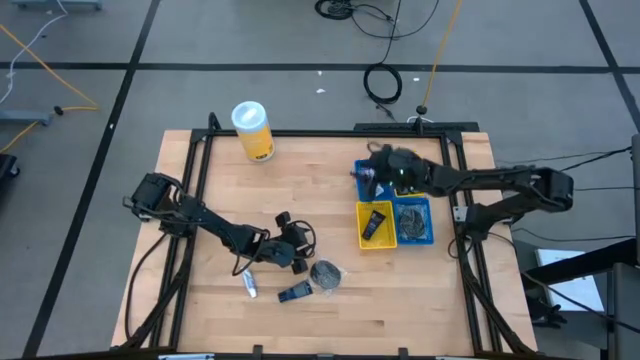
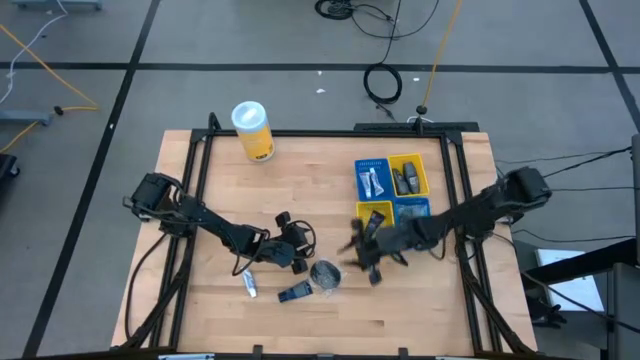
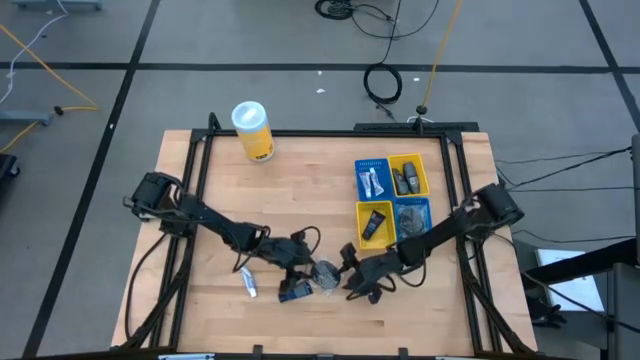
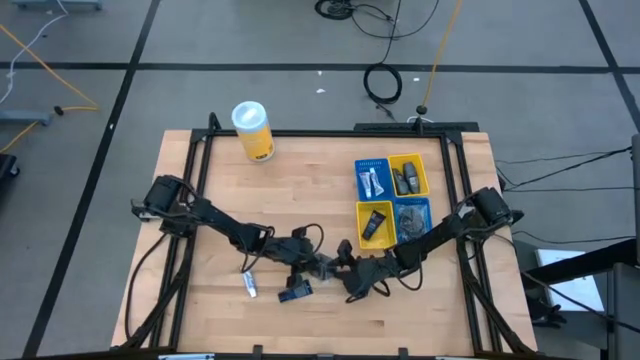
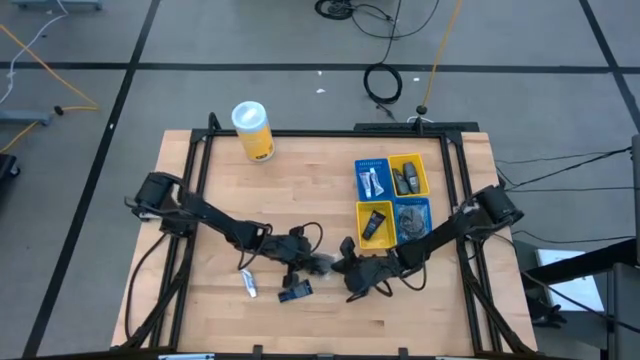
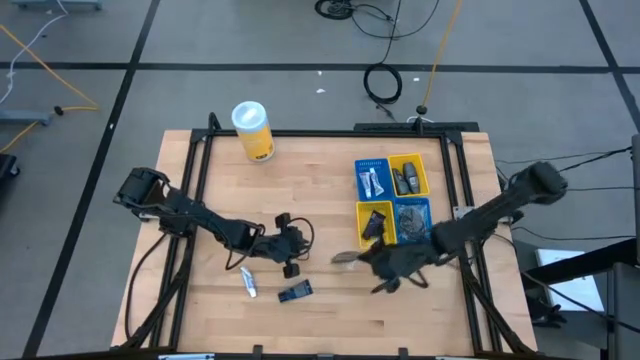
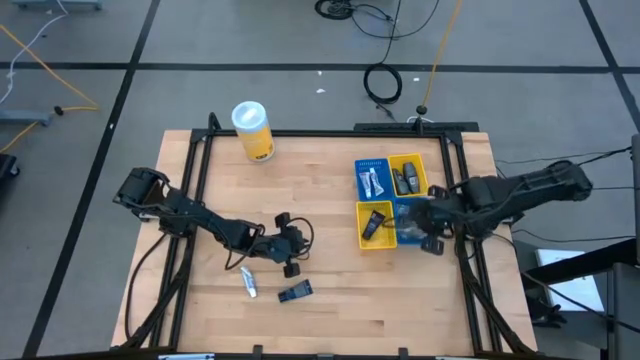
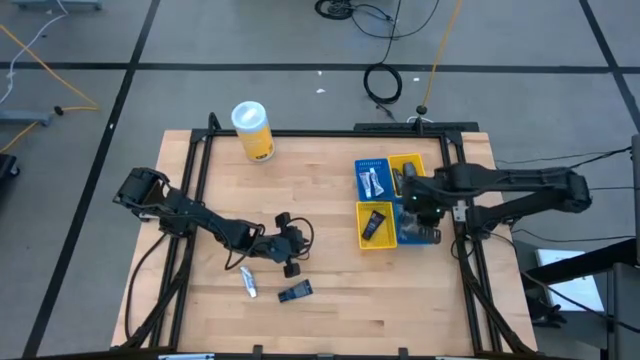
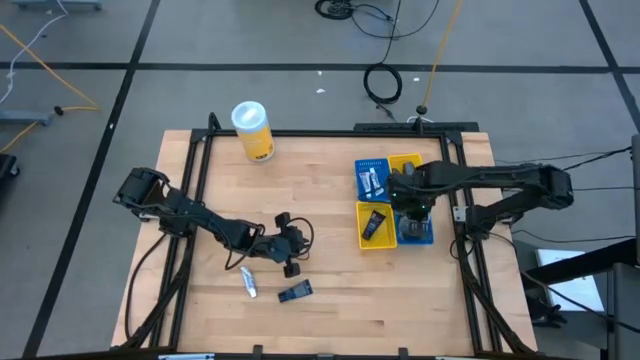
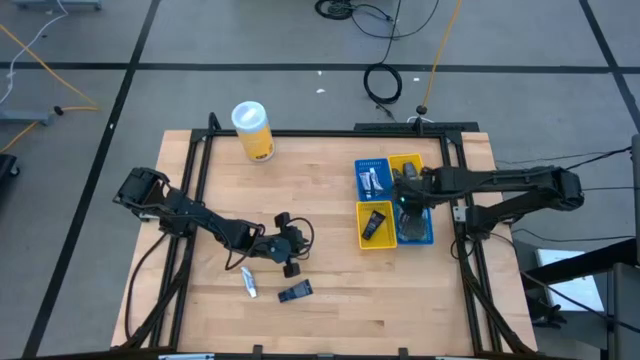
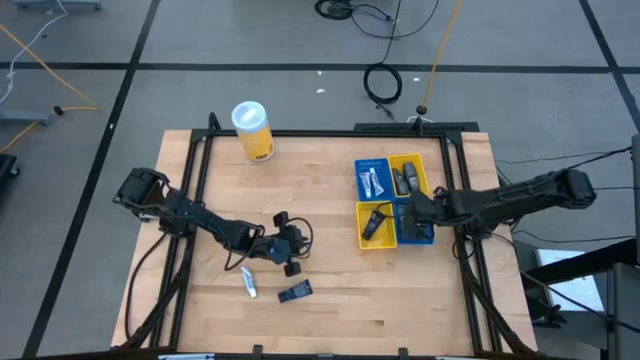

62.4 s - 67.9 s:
Task: Pick & Place Travel size toiletries
Put the black hairbrush into the bottom blue bin

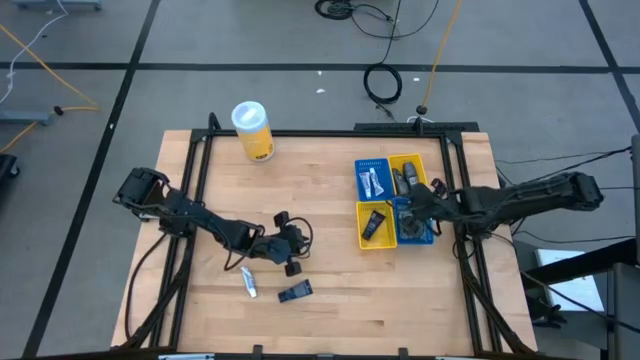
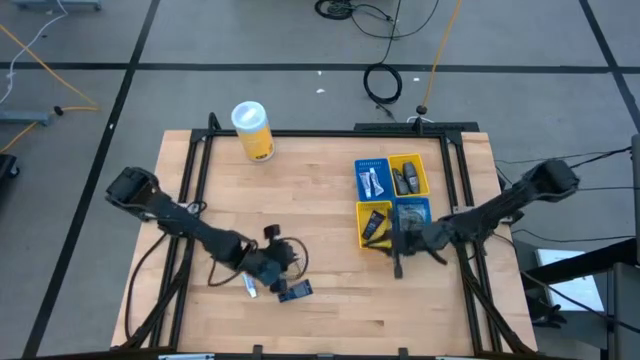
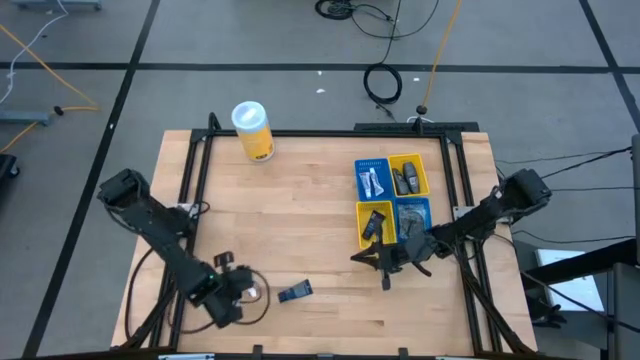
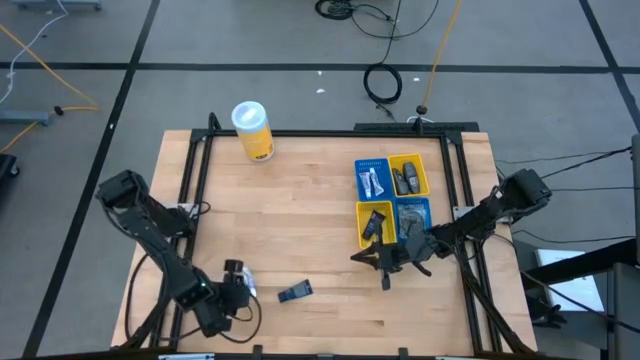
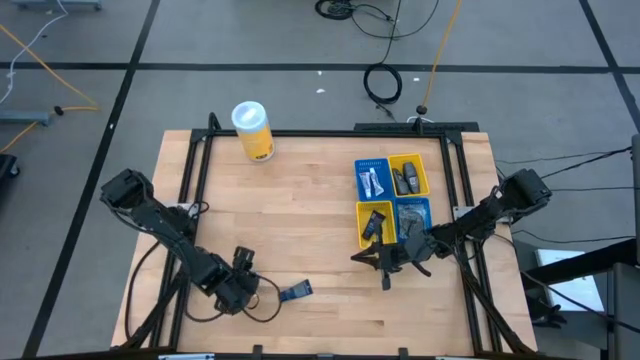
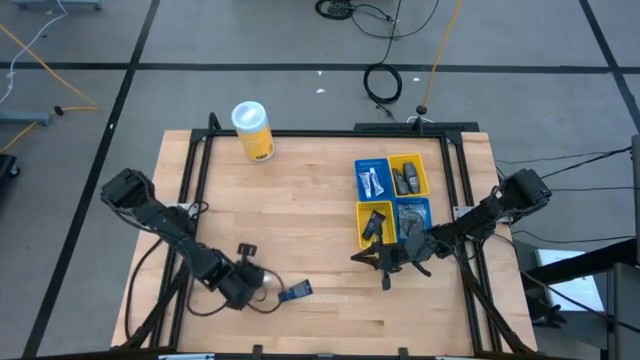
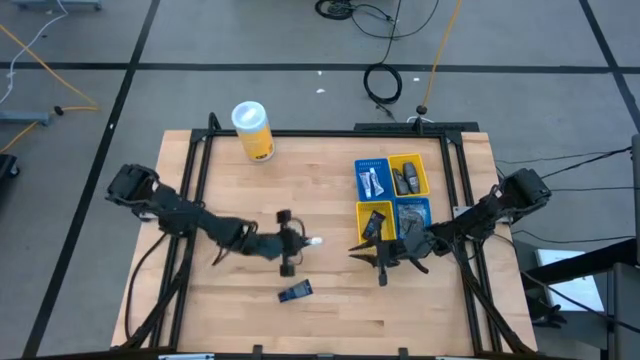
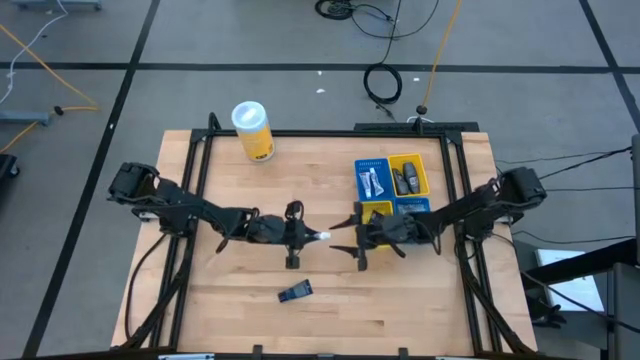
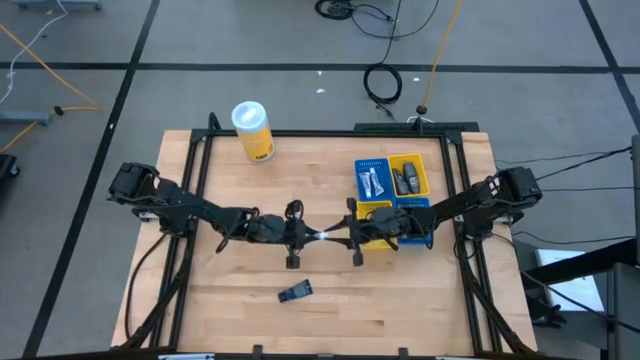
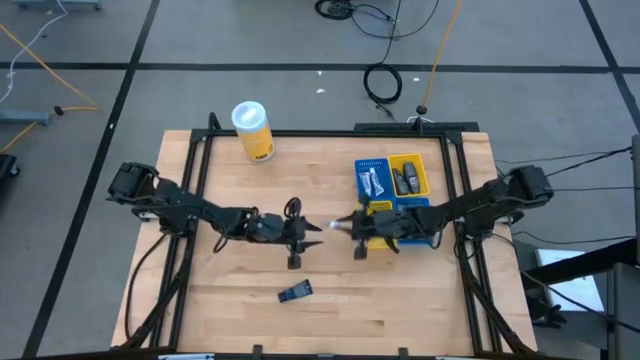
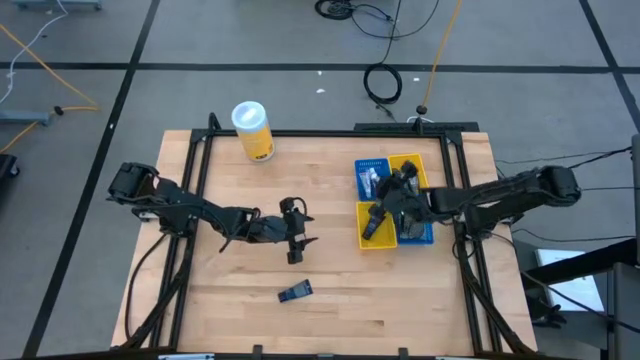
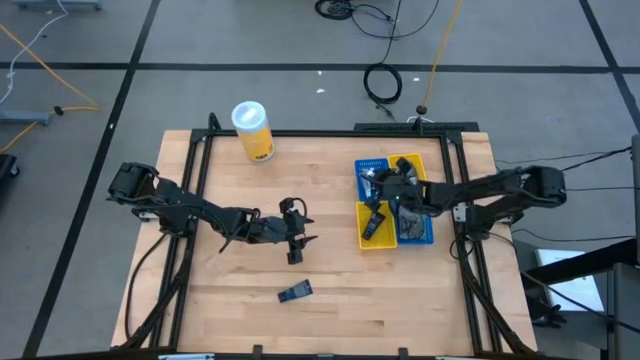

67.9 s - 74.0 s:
Put the white toothpaste into the top blue bin

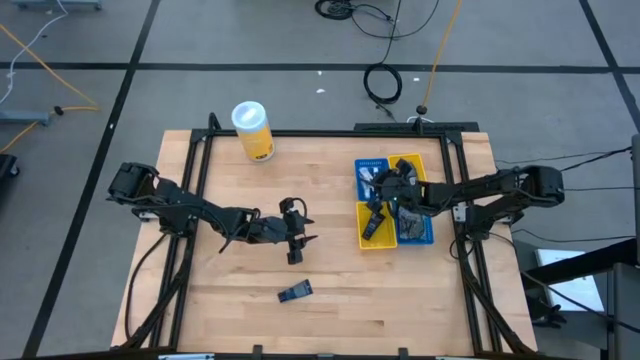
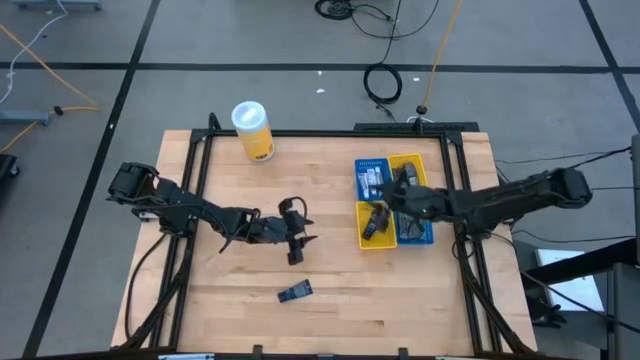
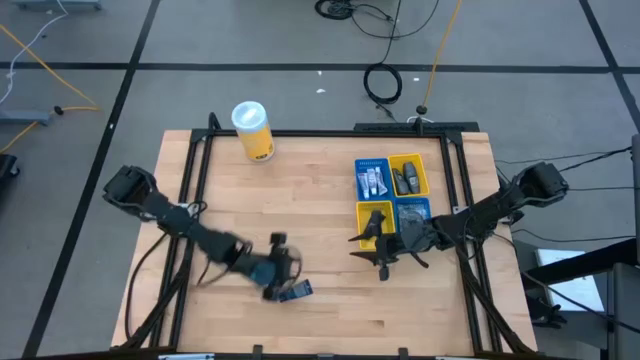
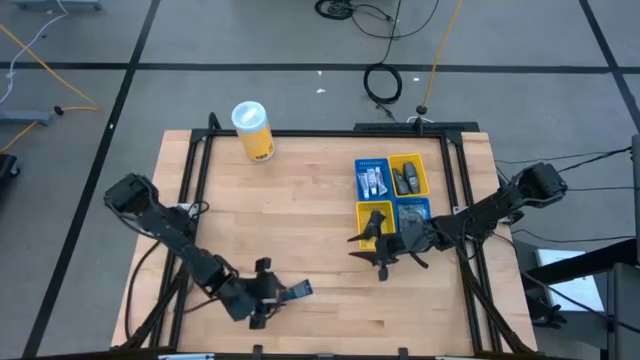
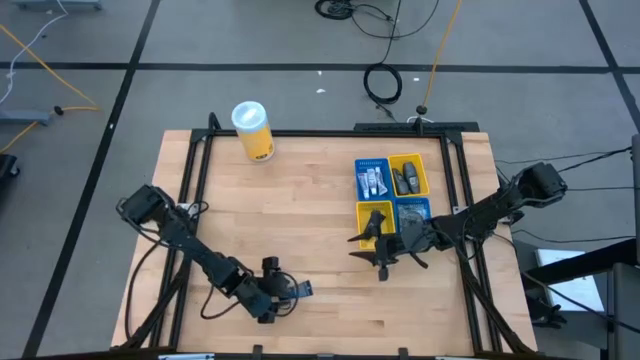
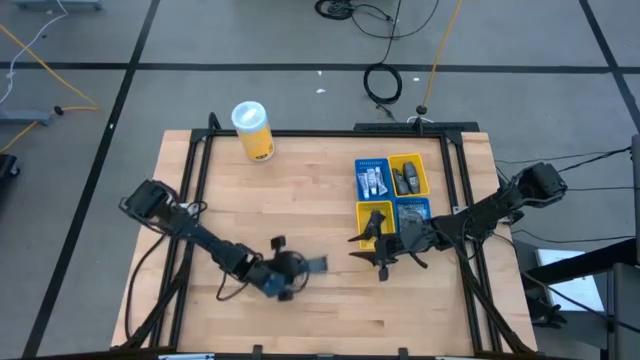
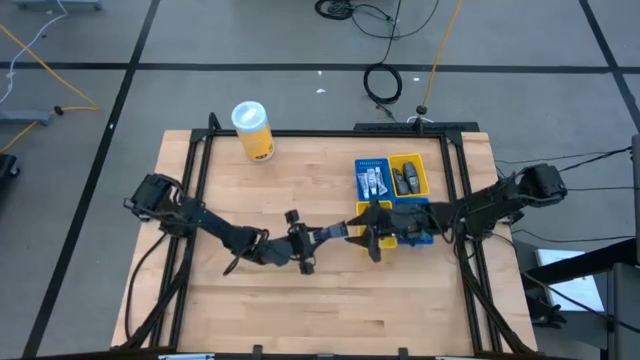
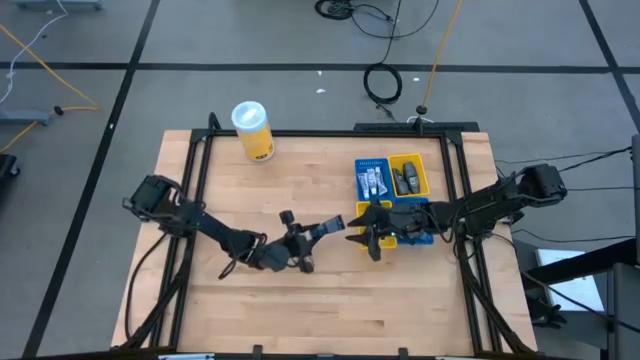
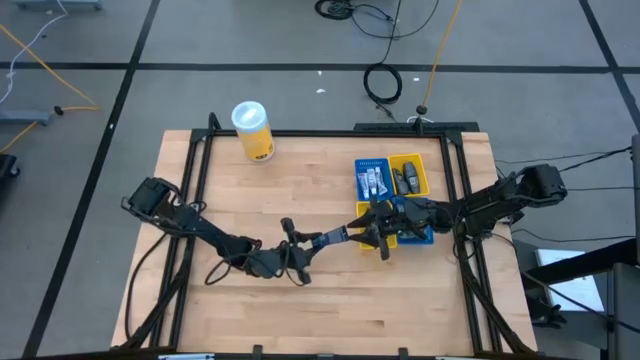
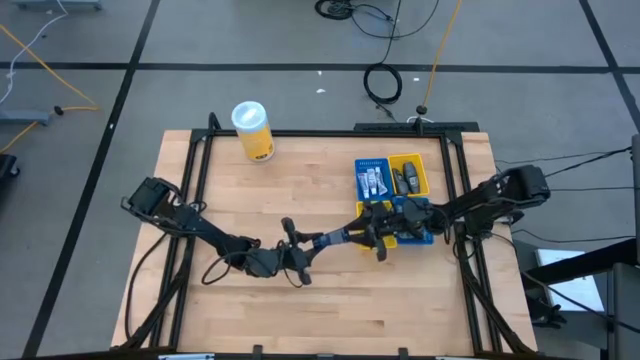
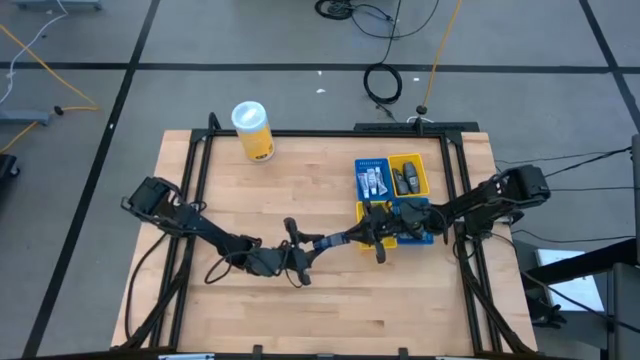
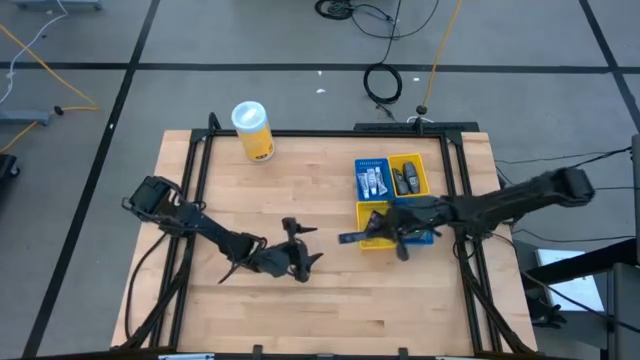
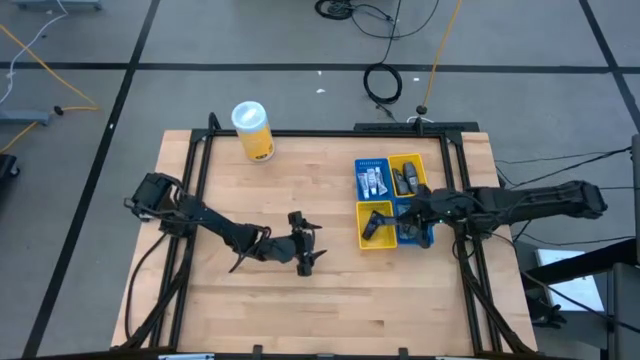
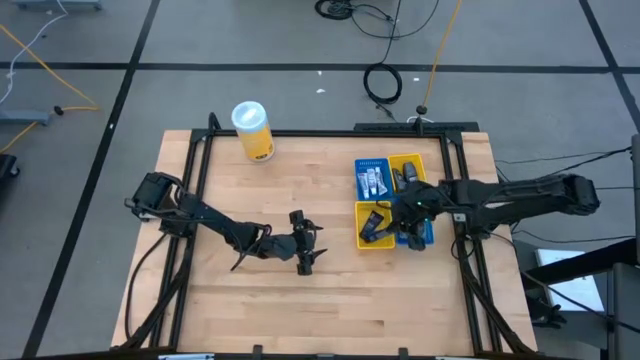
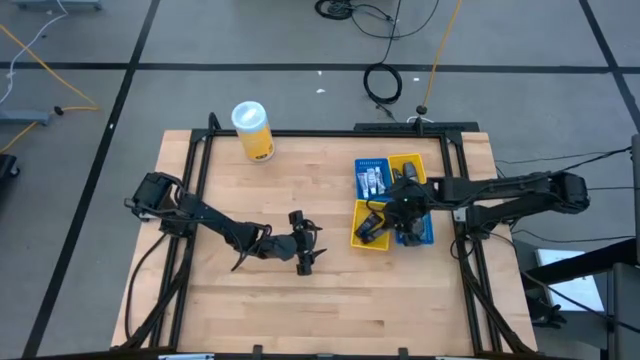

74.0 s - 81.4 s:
Put the blue shave cream into the bottom yellow bin

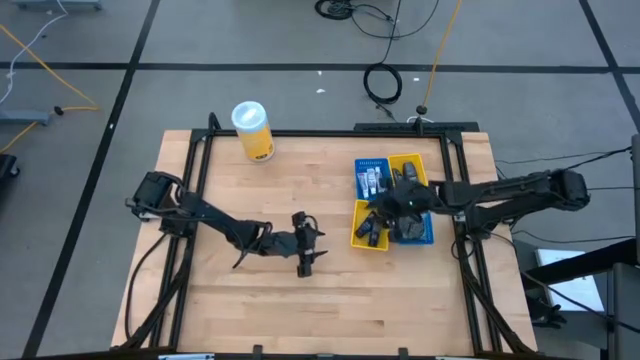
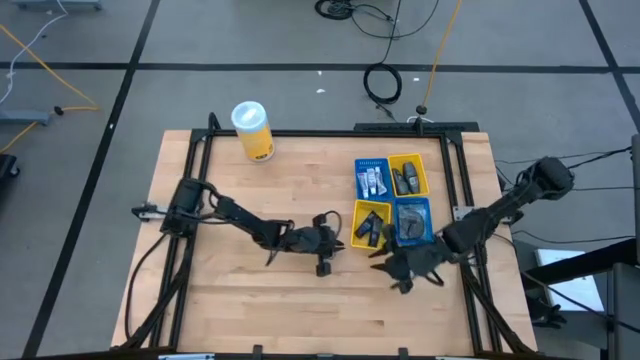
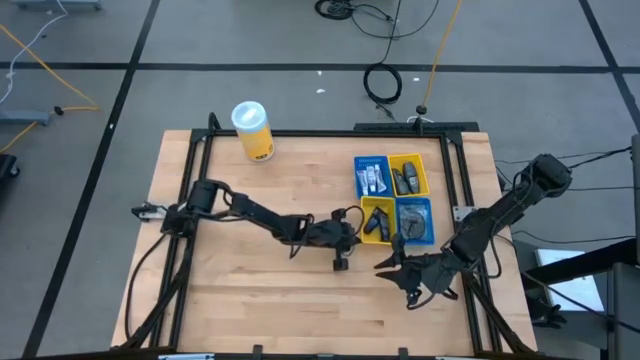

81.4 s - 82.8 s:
Adjust the bottom yellow bin
